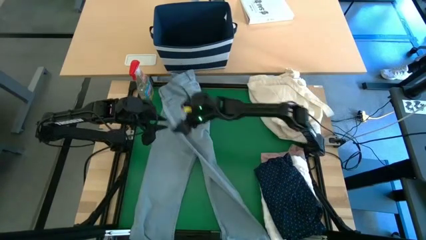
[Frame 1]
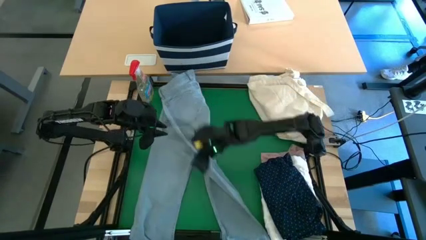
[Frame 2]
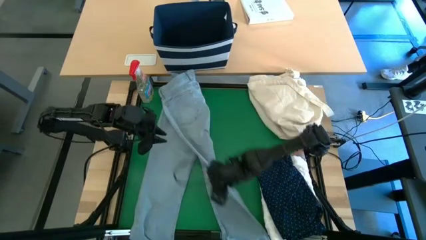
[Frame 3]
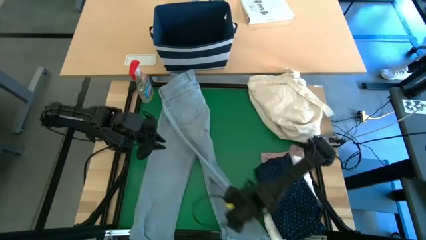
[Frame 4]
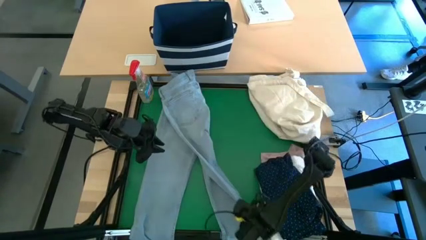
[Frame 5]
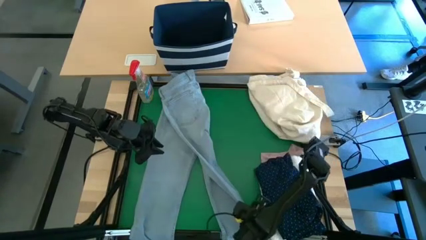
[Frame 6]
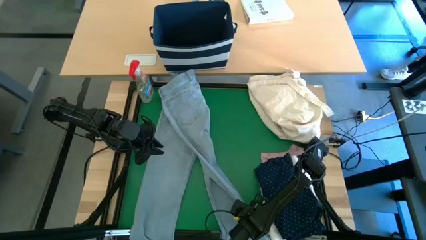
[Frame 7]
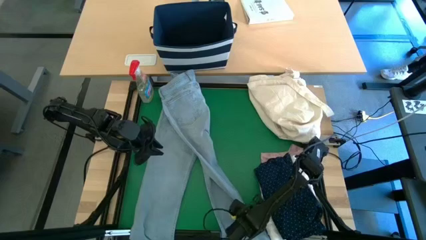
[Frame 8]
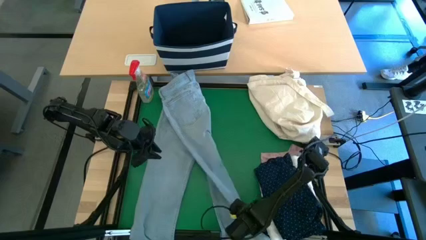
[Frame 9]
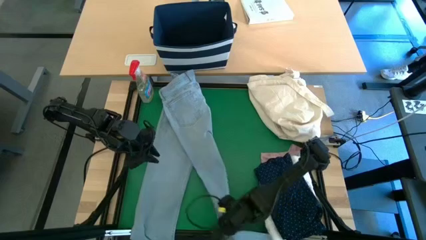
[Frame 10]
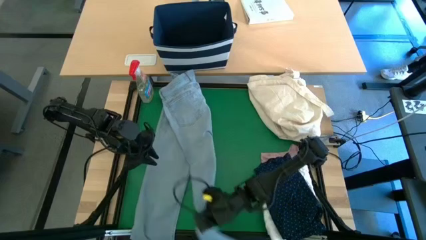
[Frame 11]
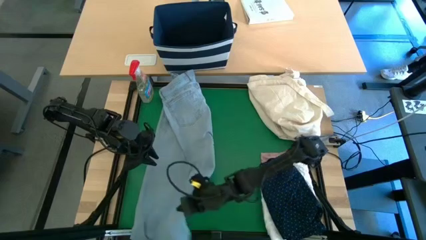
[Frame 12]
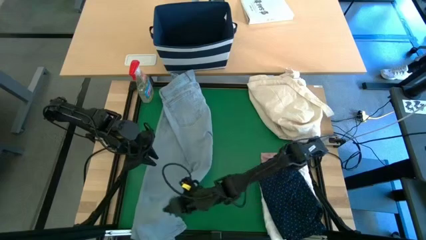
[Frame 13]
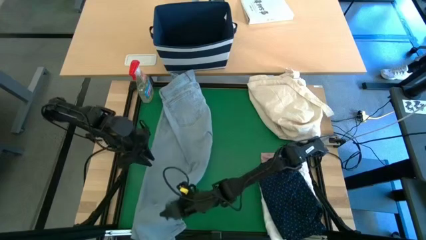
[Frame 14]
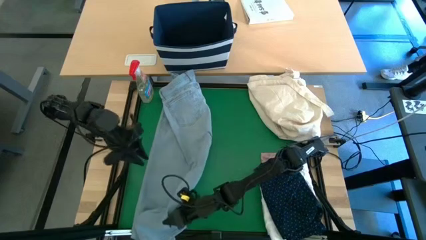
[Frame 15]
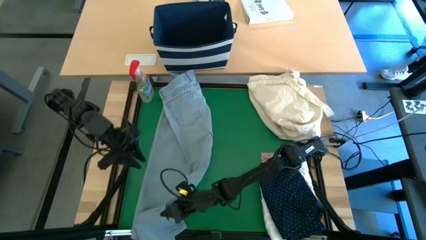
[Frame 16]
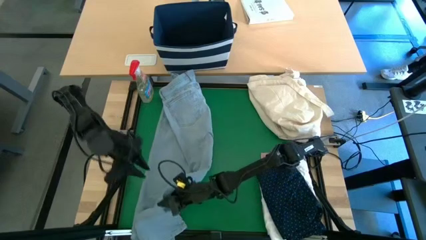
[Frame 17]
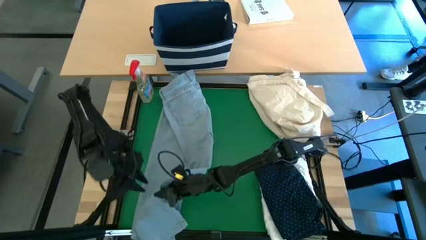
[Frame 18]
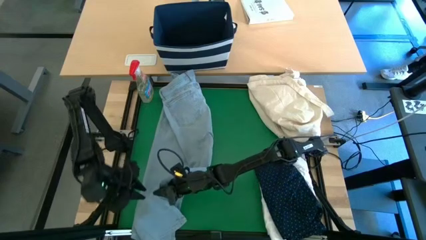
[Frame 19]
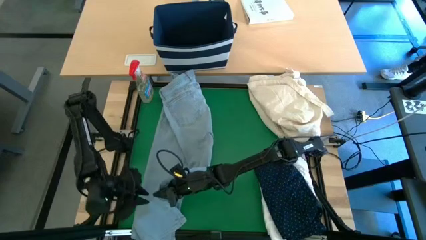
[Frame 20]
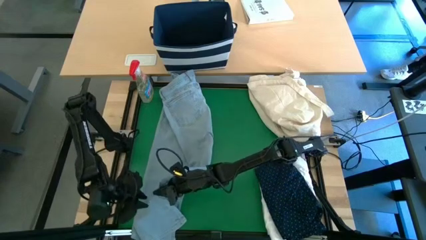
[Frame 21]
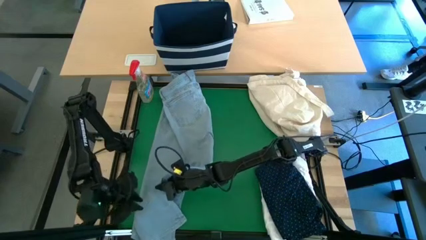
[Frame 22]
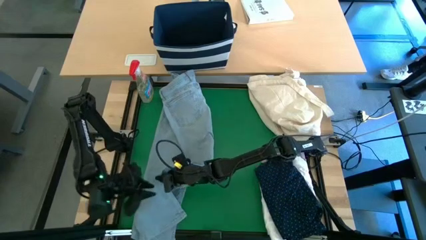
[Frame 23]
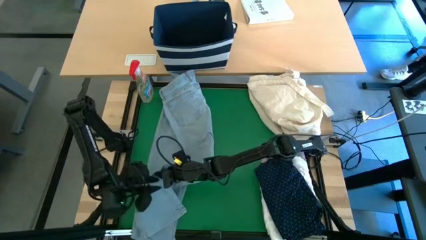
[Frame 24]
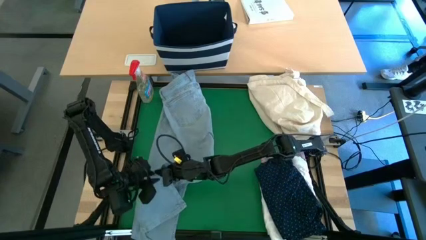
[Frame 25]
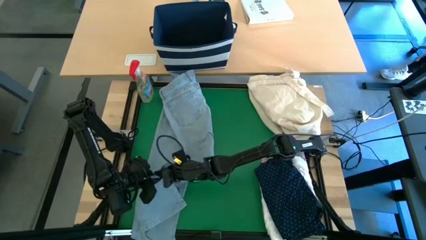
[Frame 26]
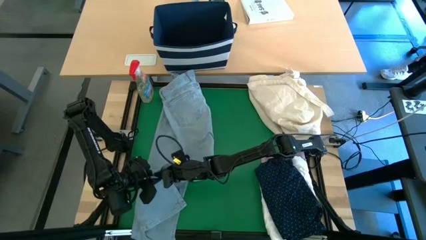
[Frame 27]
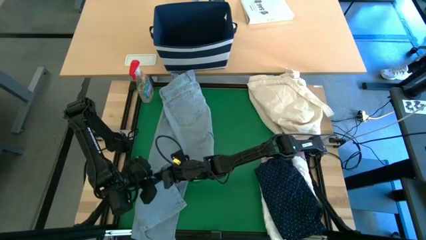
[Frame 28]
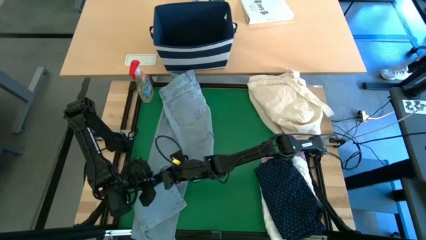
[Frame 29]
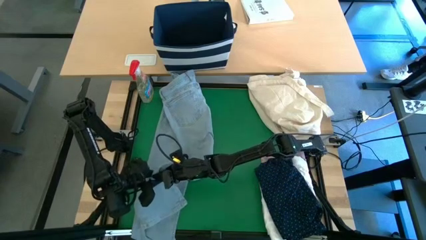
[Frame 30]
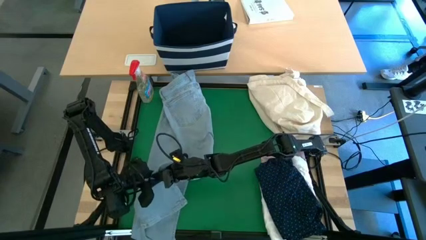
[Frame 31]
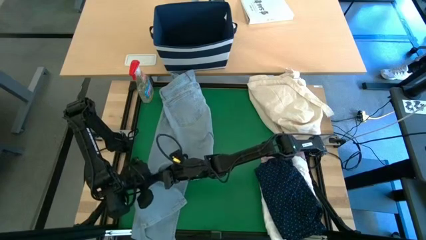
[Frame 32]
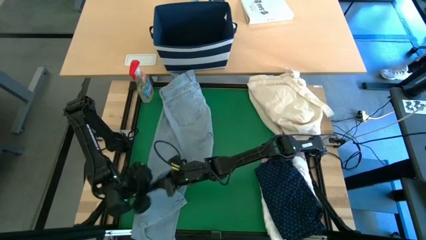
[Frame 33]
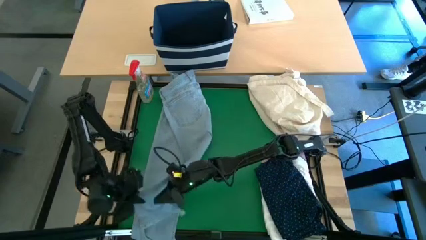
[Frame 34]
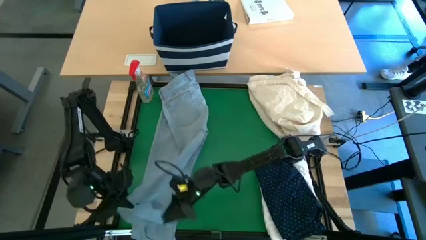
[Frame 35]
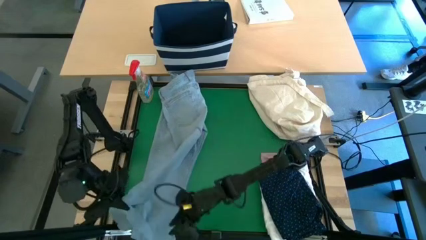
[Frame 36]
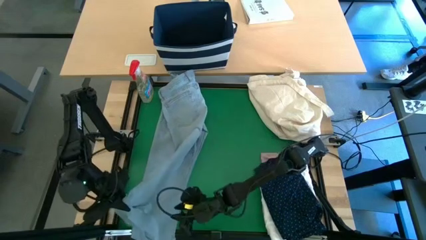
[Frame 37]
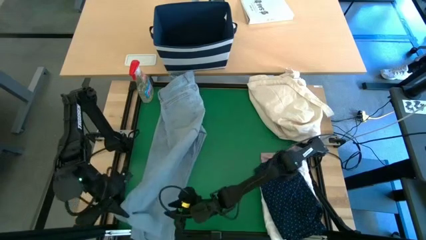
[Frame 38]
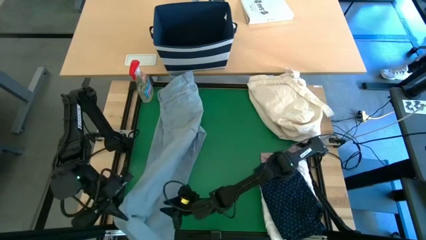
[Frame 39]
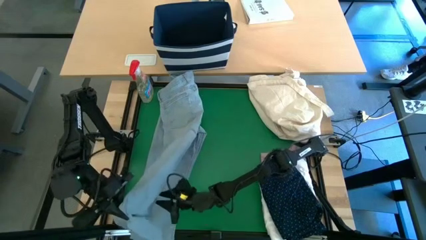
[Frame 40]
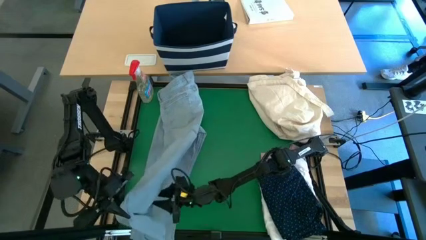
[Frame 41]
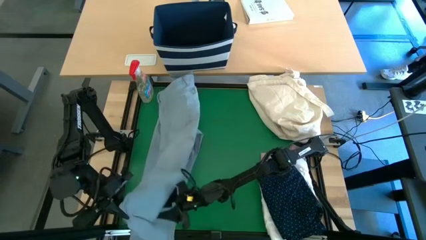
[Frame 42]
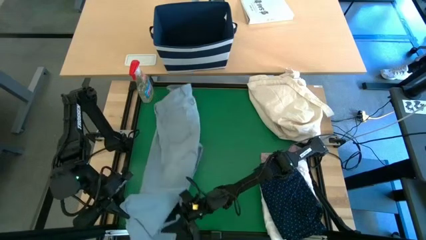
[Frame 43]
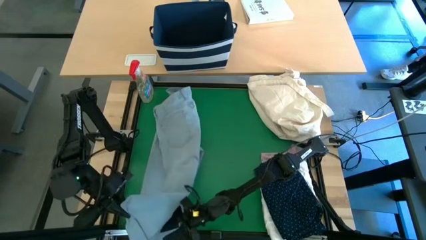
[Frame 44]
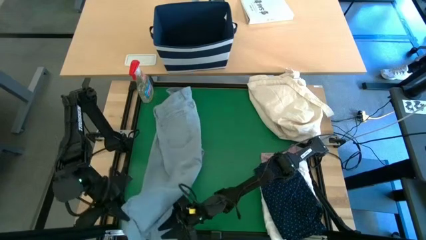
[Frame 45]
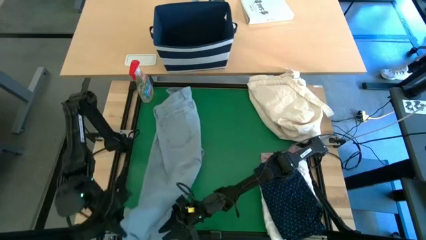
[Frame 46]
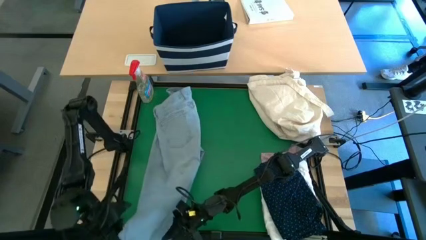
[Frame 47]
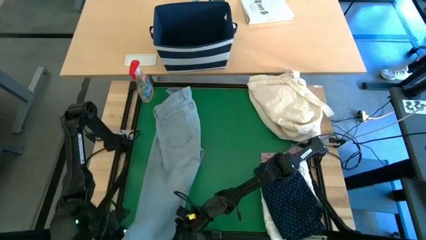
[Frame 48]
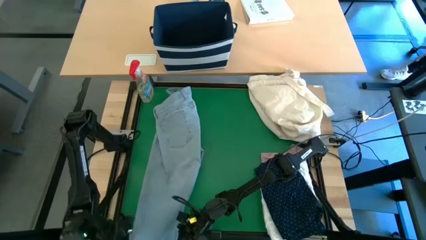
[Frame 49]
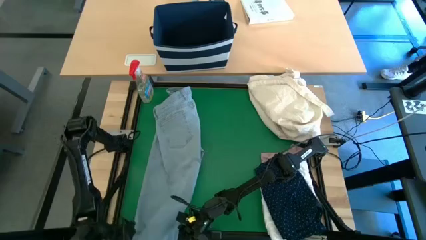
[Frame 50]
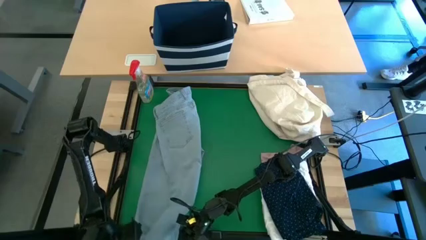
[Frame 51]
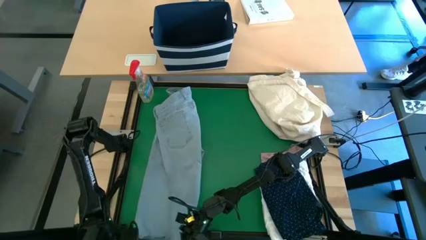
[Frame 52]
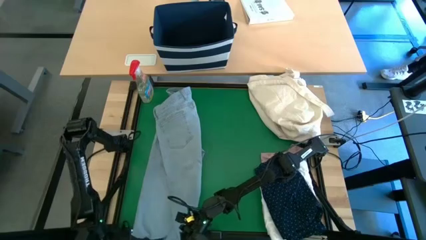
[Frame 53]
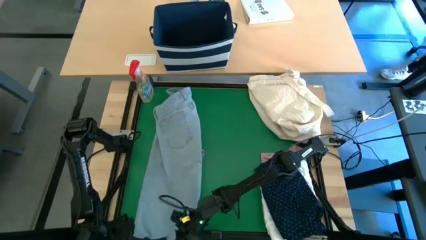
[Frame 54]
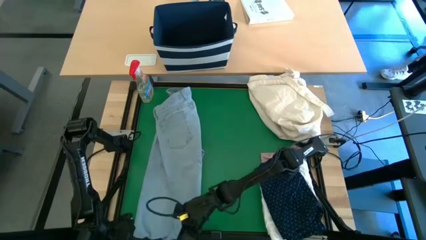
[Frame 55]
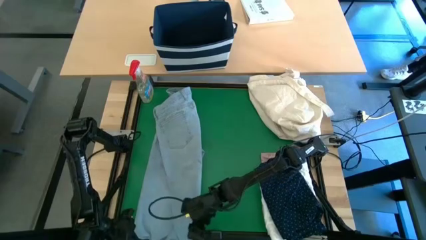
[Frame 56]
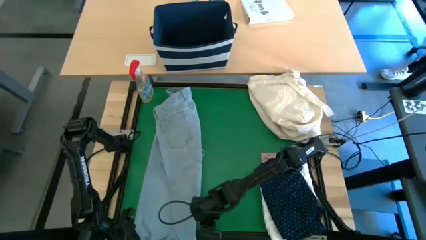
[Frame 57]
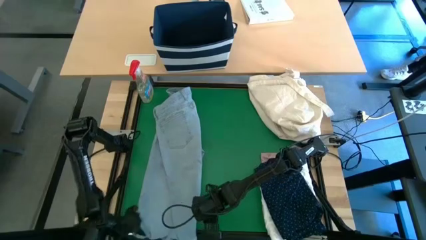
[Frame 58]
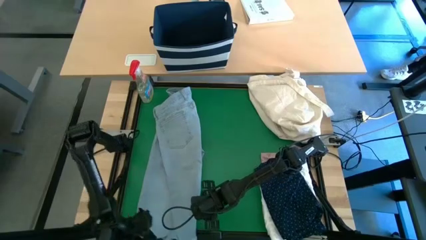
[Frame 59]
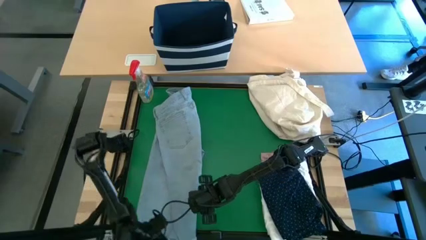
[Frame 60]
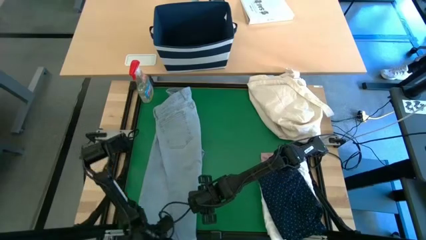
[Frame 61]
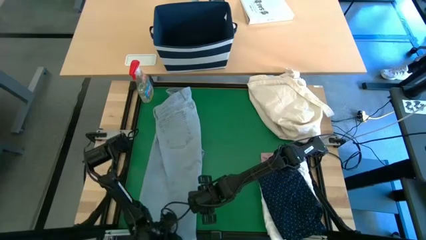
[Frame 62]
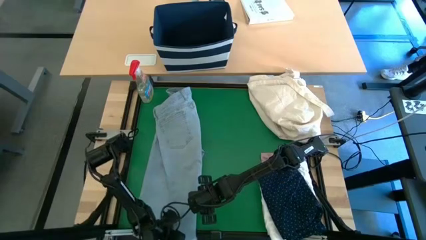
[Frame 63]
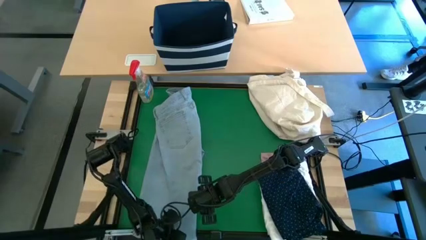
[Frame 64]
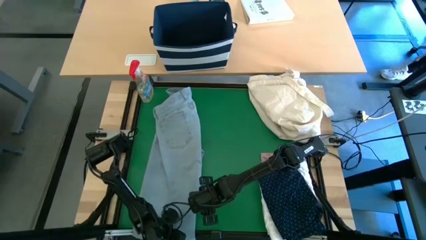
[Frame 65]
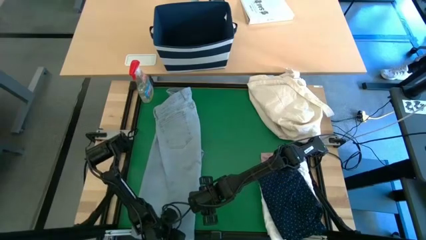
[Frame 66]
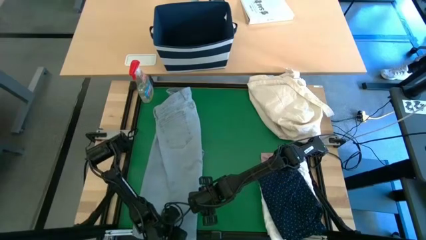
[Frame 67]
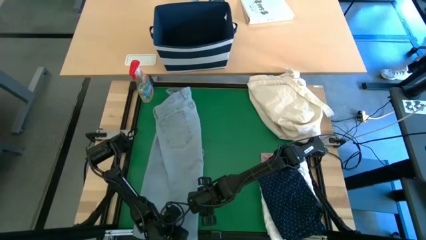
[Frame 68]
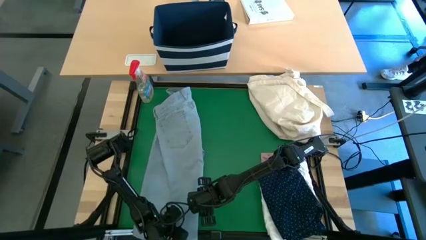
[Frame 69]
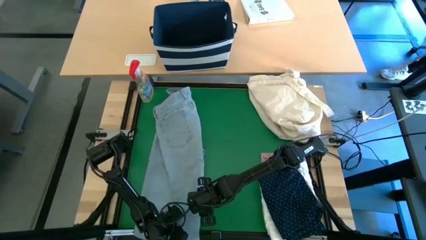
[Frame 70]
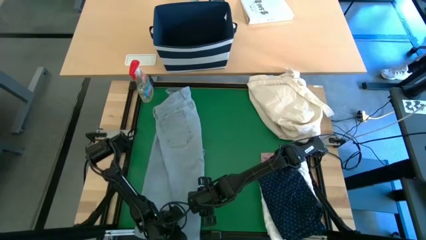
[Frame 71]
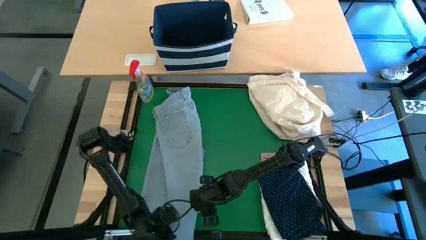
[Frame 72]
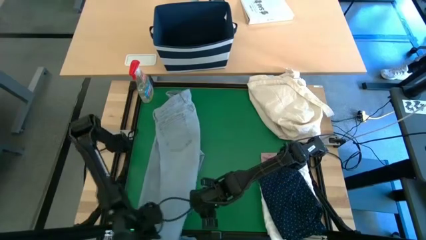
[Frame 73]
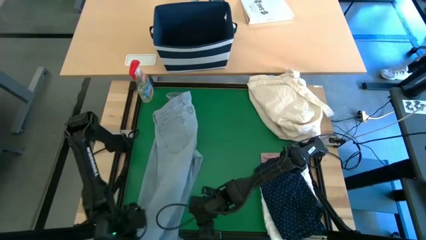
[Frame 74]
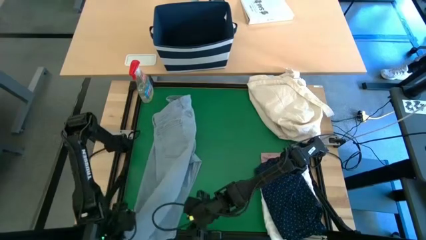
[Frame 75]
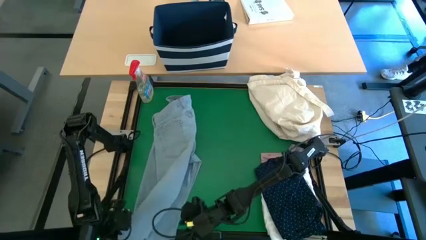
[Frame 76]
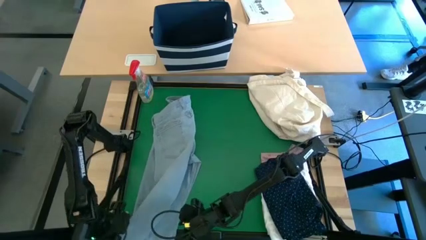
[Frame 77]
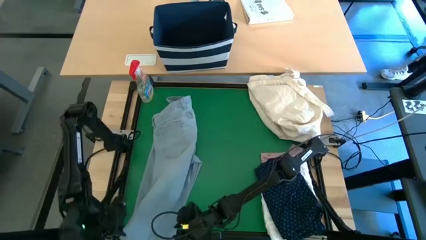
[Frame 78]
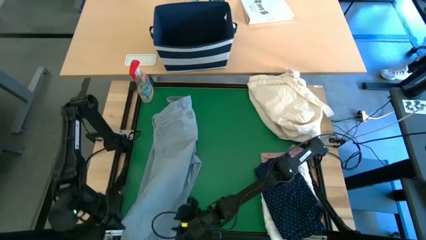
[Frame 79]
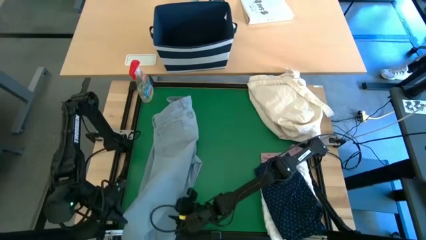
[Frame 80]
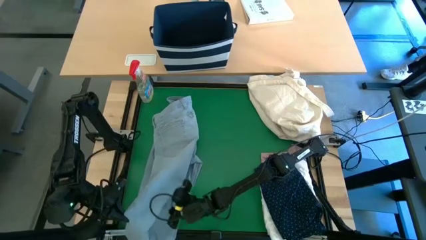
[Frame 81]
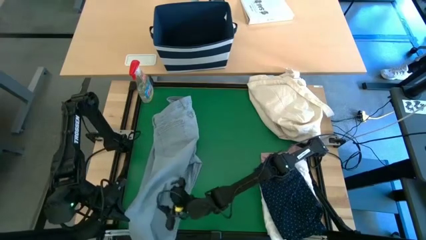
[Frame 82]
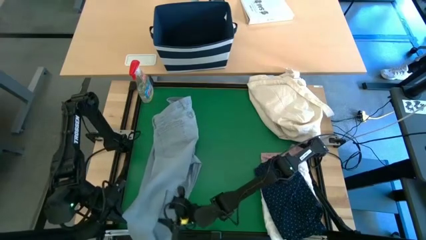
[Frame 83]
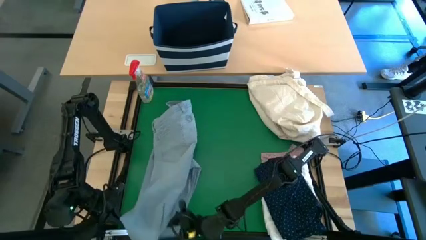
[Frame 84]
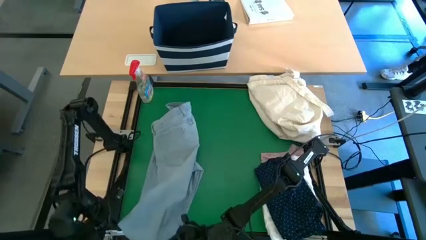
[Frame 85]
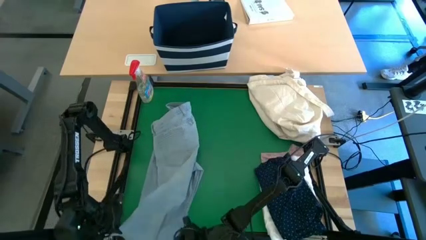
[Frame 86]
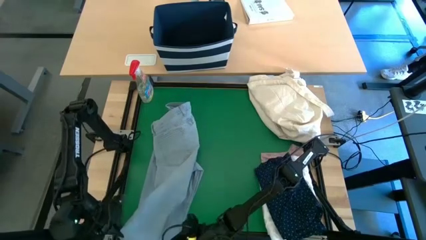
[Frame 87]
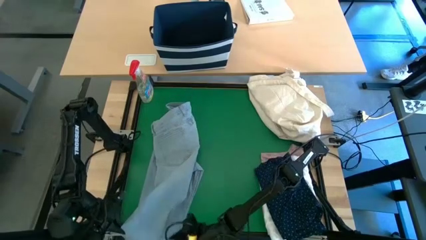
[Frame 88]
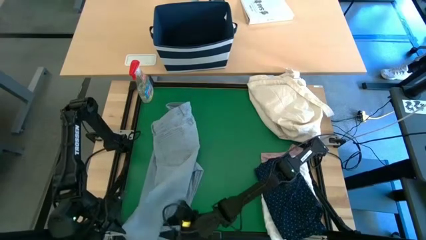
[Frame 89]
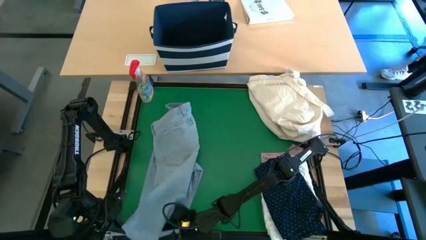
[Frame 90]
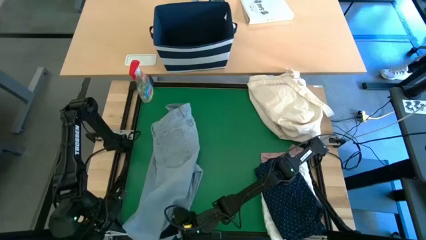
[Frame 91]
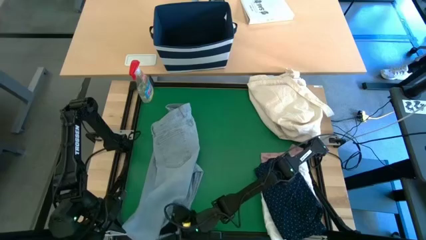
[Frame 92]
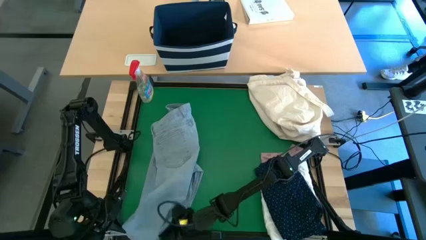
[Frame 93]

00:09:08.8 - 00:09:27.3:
Task: Fold laundry
Fold the blue jeans
